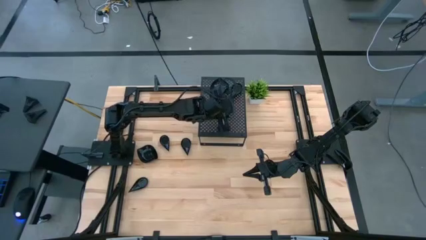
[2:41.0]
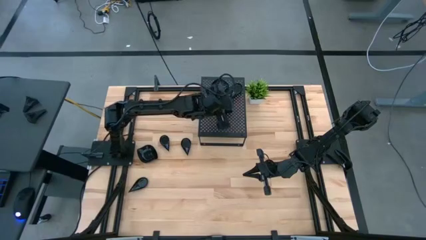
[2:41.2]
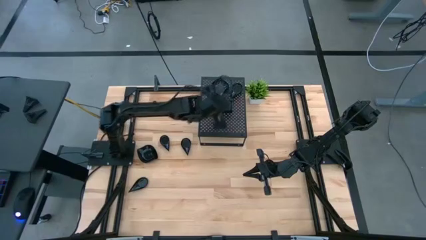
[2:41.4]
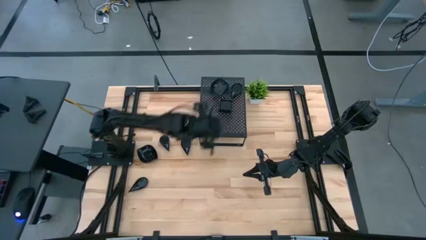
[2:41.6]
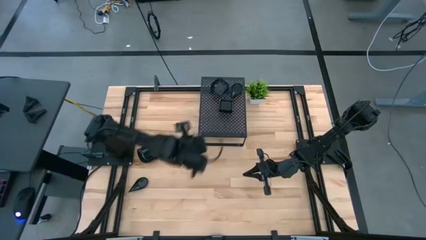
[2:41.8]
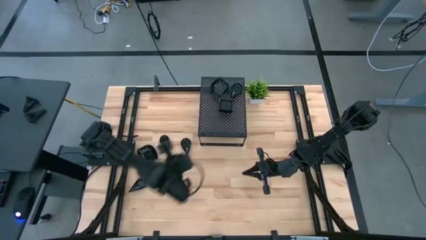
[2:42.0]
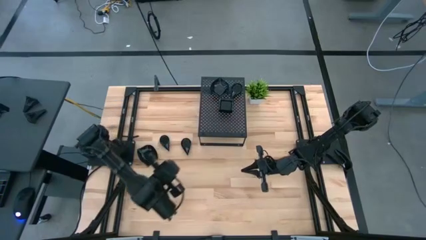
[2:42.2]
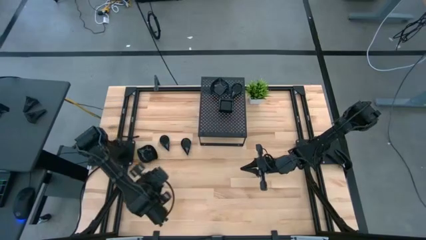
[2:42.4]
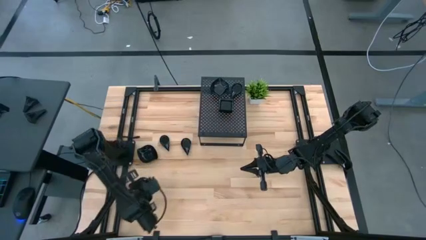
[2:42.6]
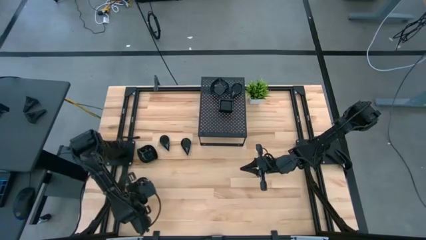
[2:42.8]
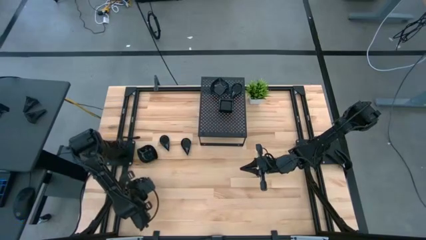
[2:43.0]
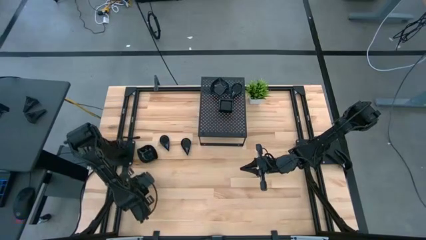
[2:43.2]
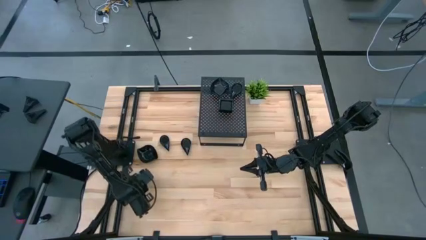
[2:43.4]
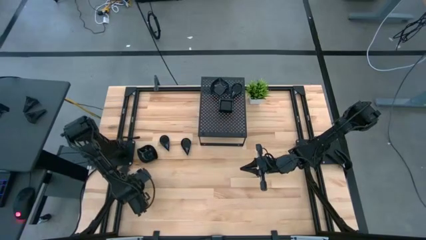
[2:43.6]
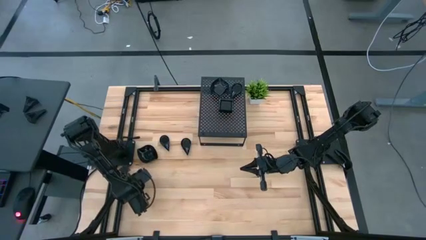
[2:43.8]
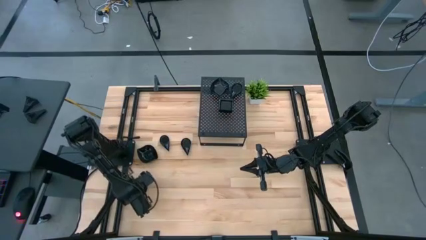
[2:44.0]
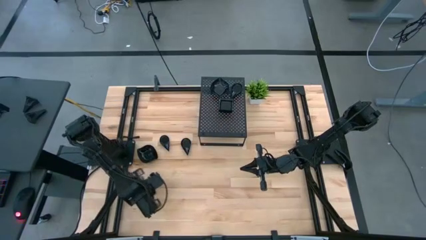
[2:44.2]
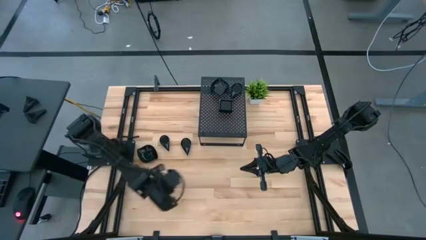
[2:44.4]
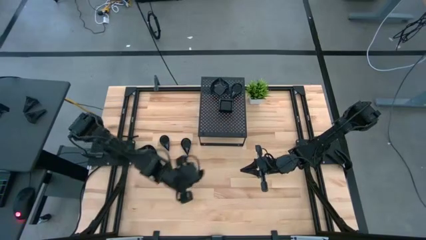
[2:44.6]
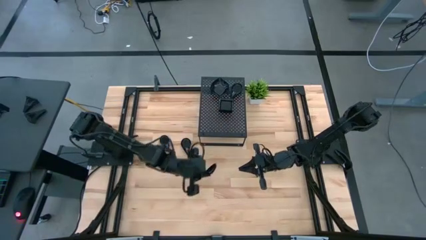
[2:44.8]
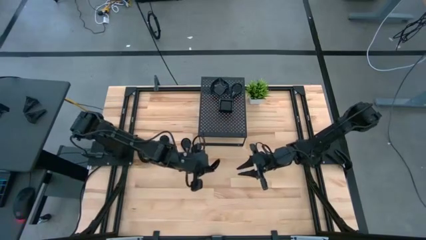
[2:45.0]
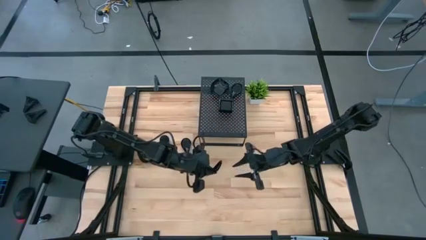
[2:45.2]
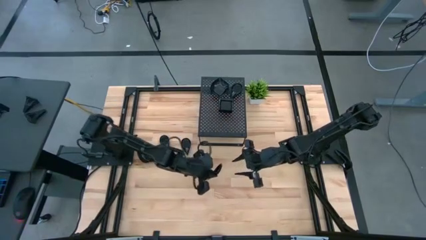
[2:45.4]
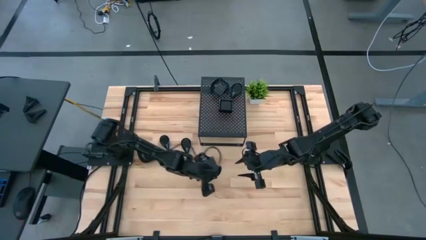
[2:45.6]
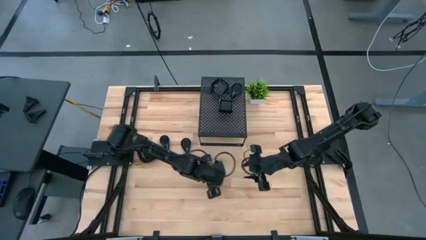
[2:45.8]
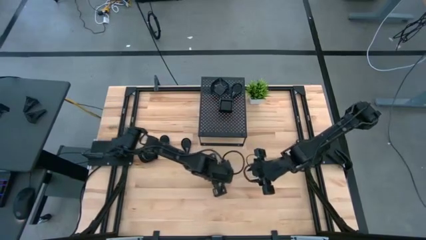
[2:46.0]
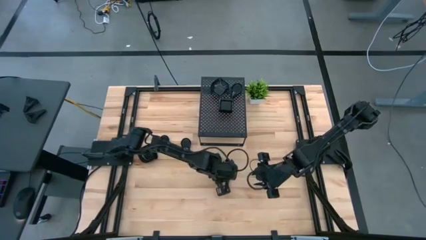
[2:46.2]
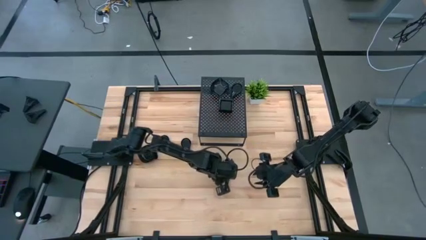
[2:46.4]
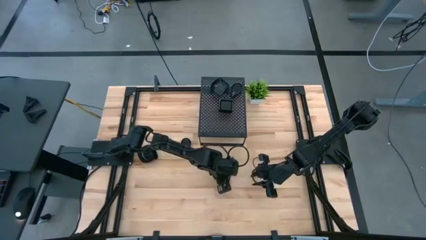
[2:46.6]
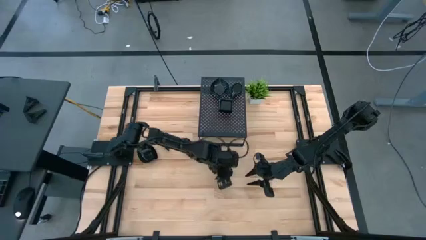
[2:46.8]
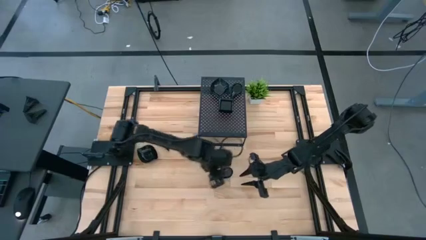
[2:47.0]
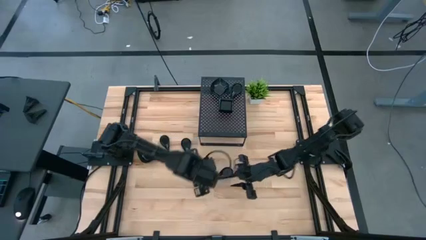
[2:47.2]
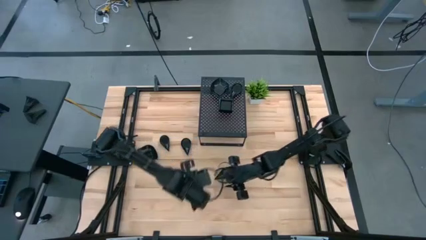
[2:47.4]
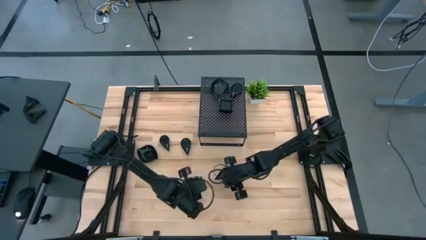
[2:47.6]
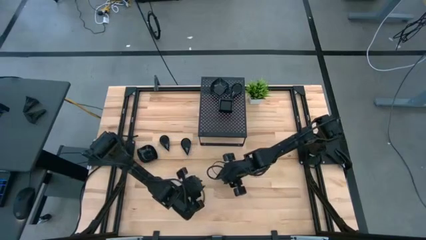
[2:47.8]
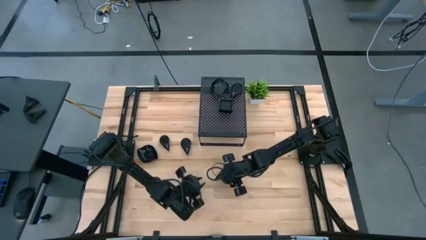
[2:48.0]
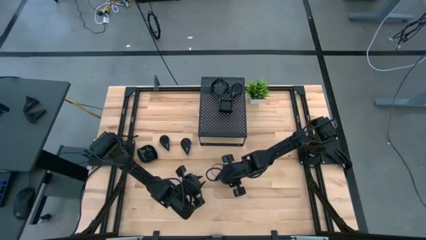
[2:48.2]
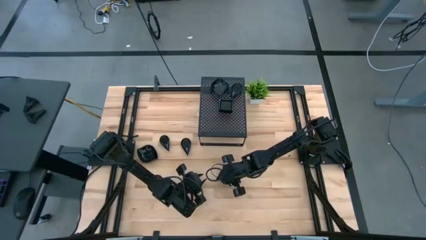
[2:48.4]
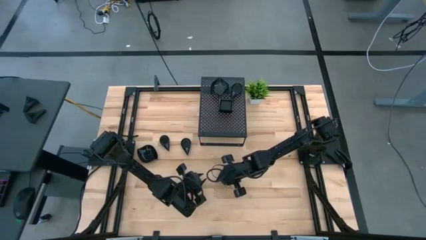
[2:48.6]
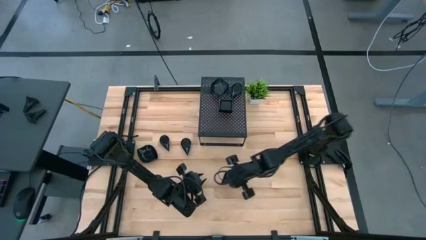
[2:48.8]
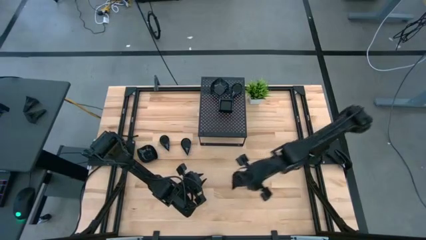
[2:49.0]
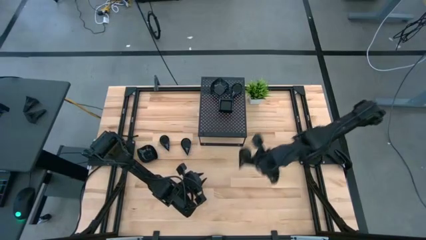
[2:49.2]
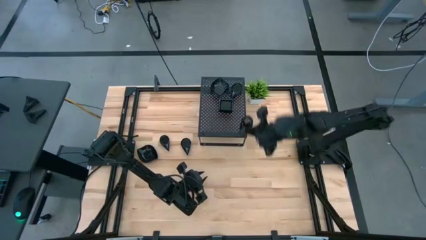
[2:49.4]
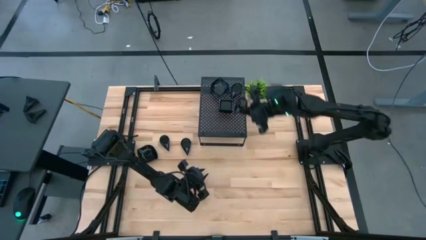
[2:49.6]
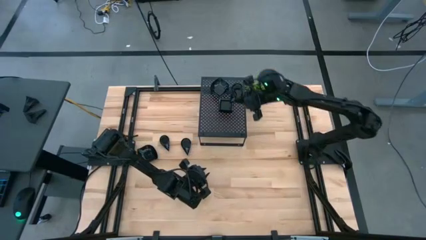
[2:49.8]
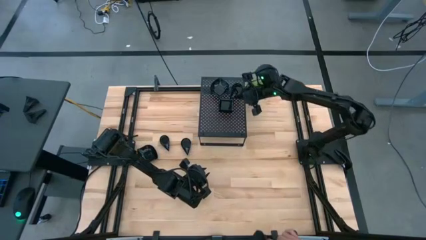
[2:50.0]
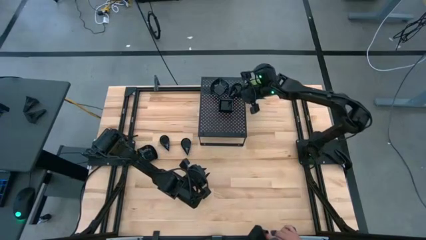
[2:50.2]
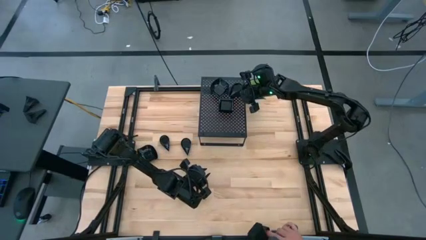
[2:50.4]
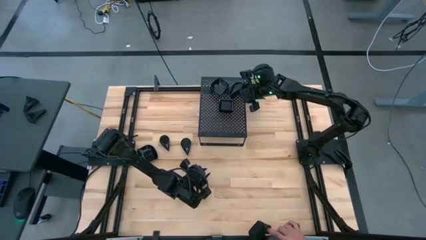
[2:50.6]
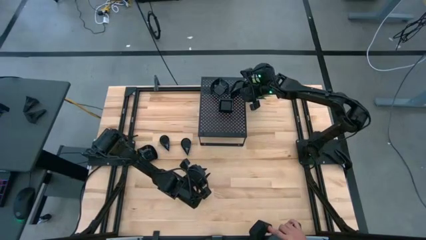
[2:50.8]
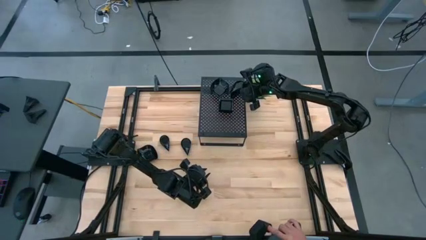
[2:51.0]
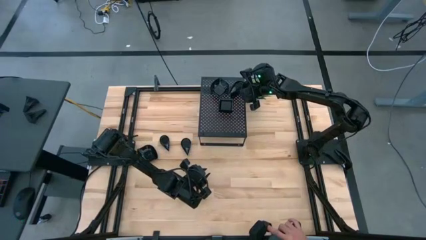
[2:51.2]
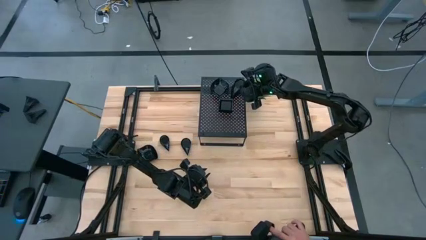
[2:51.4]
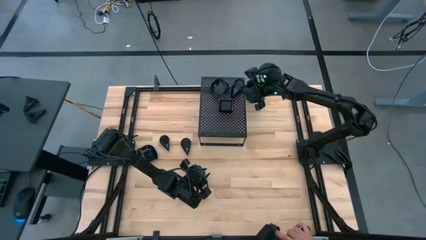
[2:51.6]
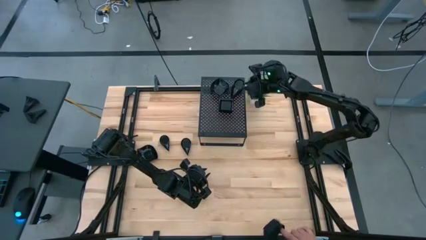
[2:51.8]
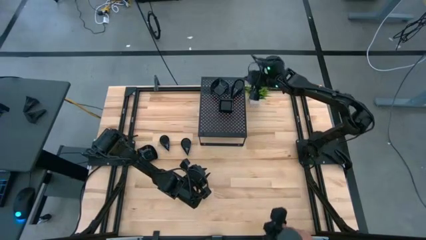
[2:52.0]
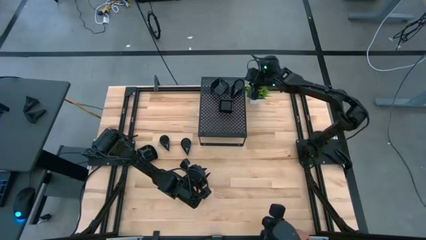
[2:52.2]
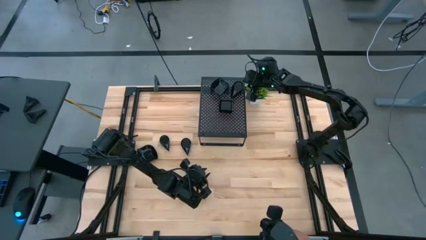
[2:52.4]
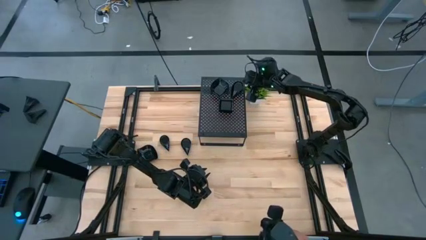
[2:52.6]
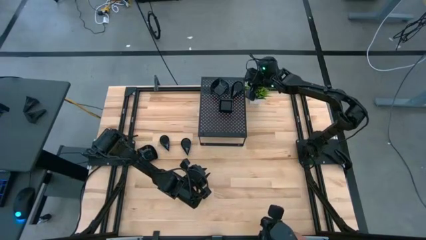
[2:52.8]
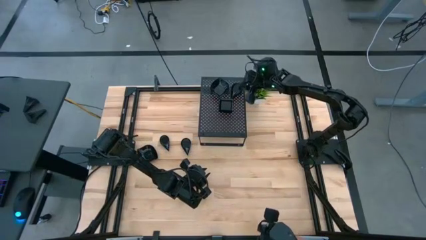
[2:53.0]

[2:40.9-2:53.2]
Task: Pick & Place Mini shaped plates
Stack the black drop-shaped plate on top of the black drop-shaped plate on the shelf

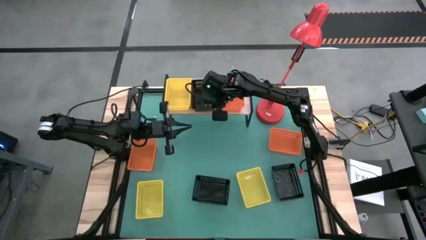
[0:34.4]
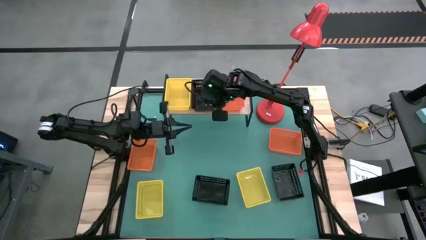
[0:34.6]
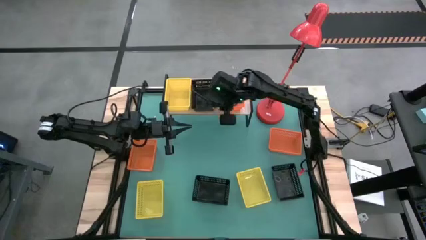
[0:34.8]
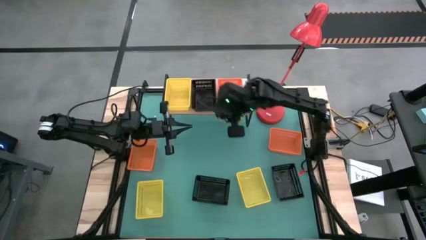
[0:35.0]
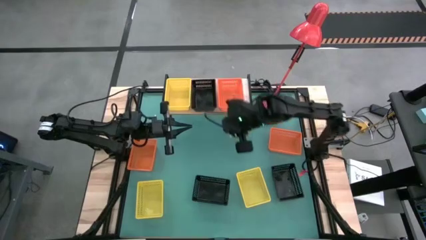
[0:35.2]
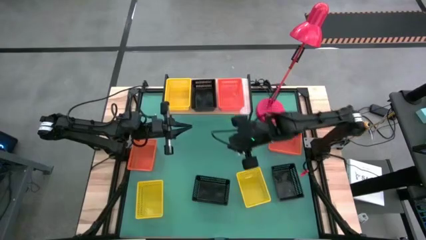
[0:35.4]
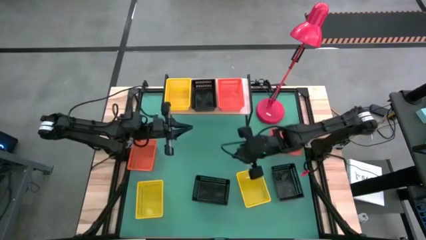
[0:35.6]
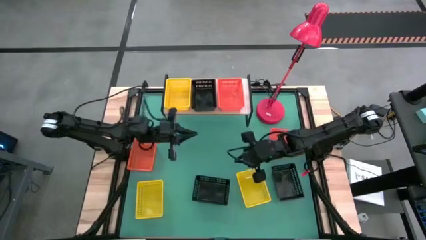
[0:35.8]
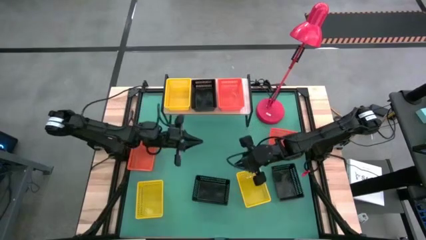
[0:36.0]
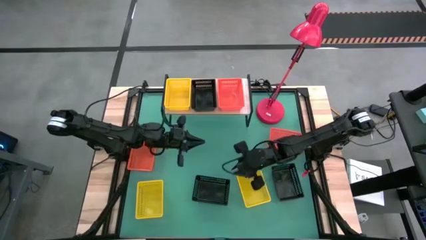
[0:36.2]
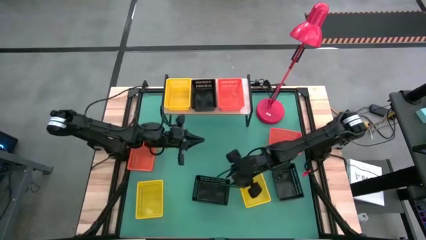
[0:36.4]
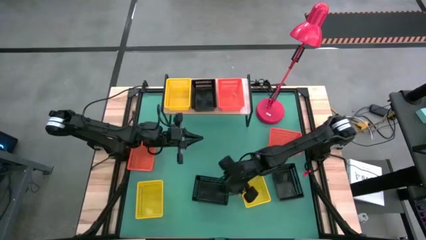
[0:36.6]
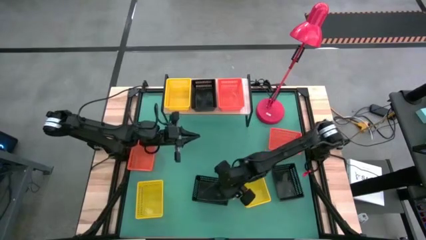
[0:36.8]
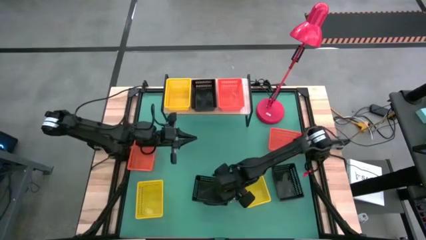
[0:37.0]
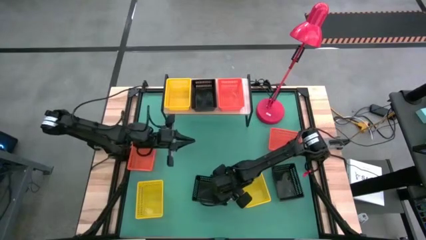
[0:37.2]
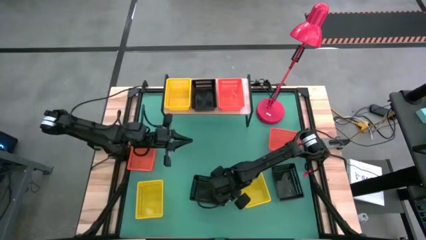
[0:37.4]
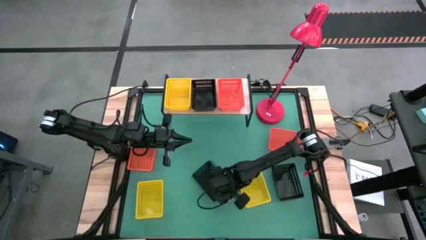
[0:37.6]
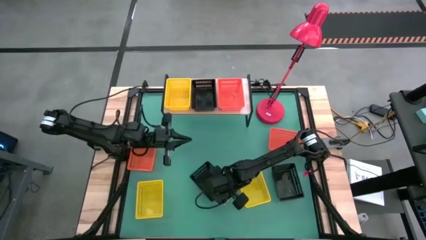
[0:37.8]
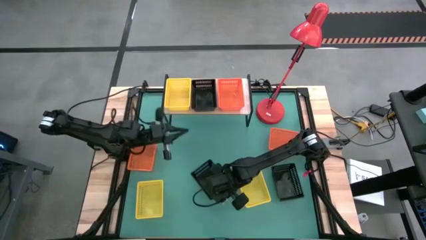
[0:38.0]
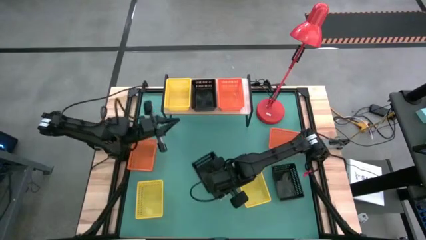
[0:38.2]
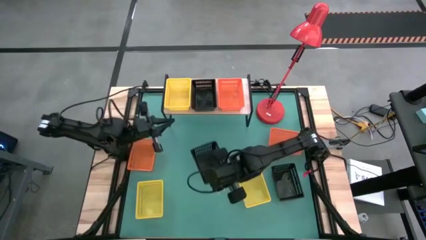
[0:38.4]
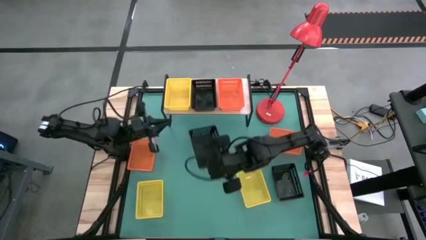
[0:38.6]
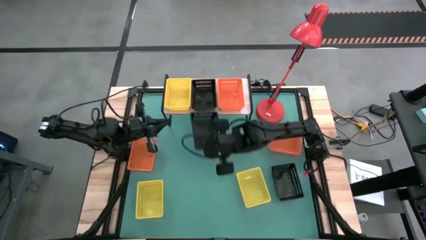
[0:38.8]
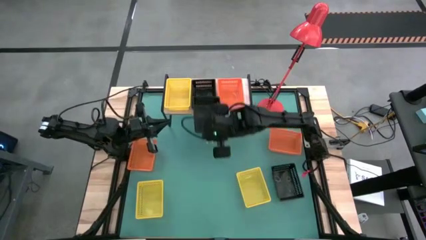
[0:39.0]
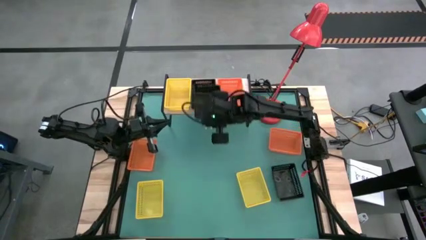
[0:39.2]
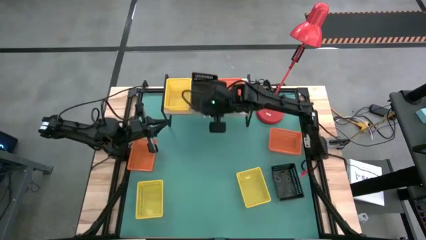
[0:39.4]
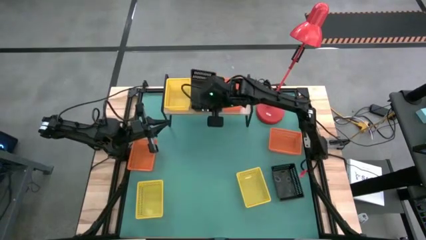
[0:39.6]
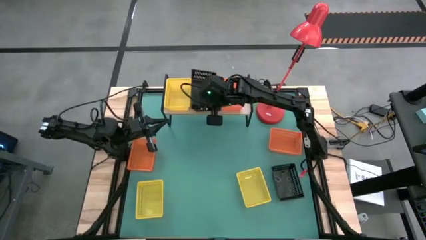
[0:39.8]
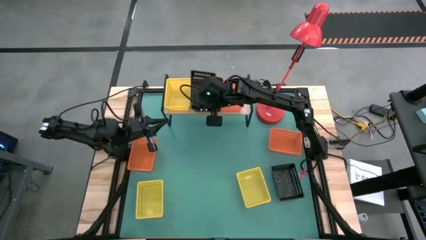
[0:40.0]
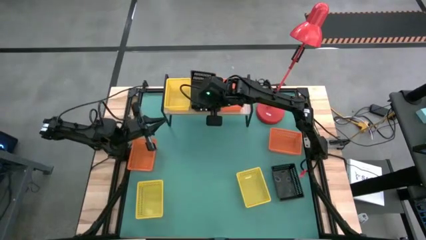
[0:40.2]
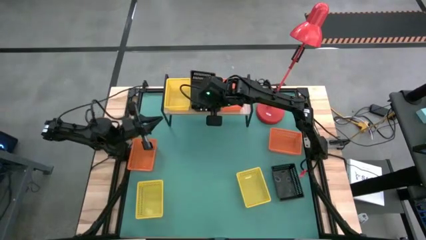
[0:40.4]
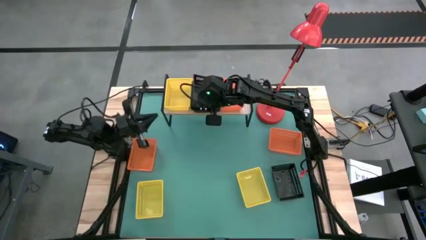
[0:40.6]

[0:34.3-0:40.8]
Task: Stack baskets on shelf by color
Stack the left black bin on top of the black bin on the shelf
